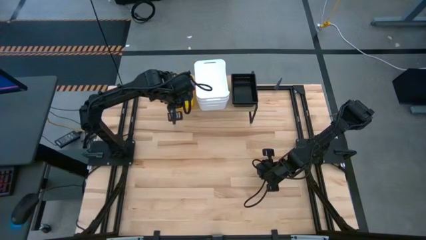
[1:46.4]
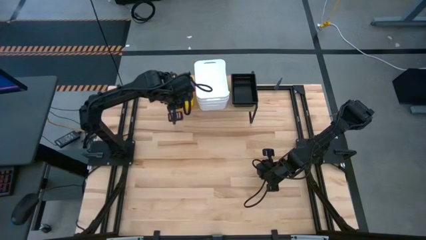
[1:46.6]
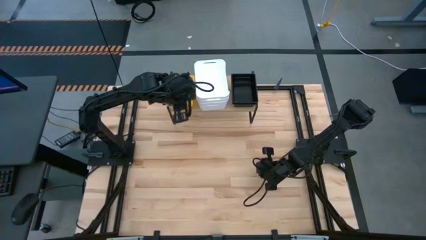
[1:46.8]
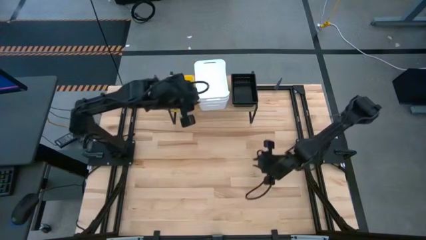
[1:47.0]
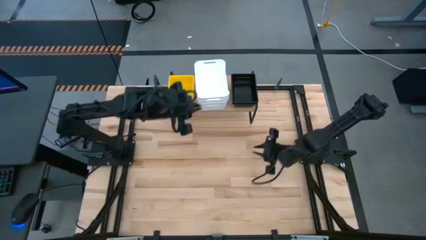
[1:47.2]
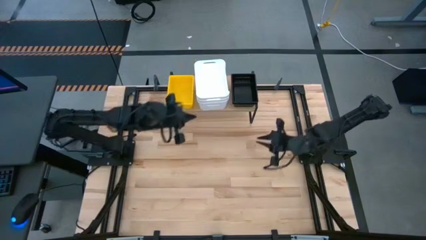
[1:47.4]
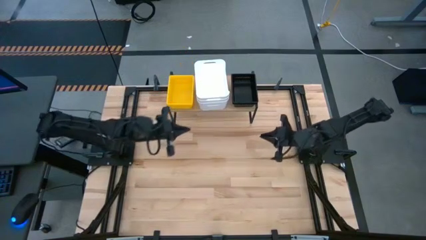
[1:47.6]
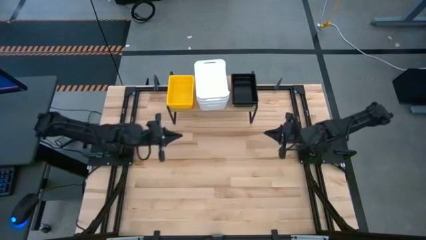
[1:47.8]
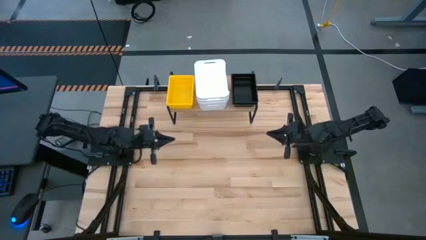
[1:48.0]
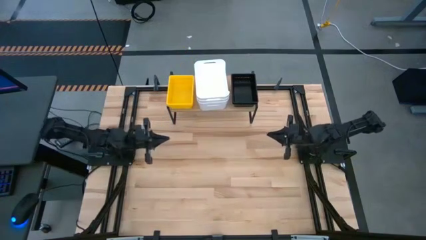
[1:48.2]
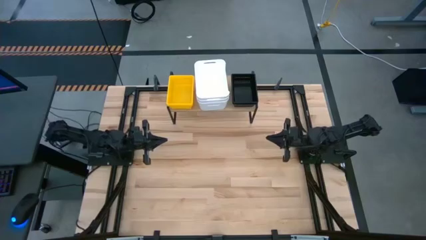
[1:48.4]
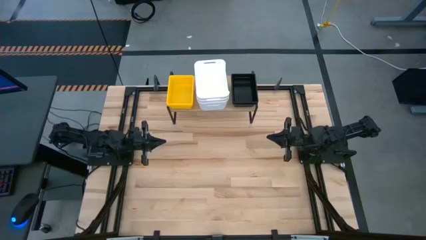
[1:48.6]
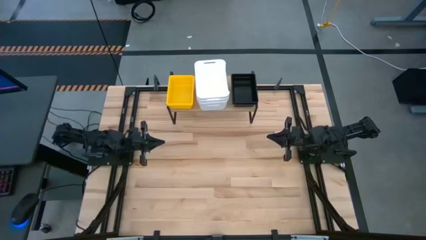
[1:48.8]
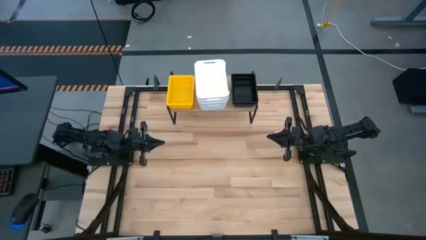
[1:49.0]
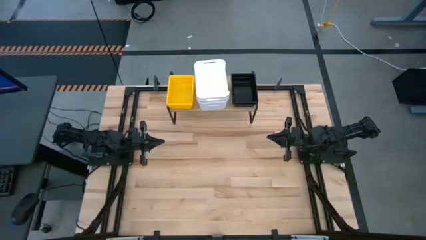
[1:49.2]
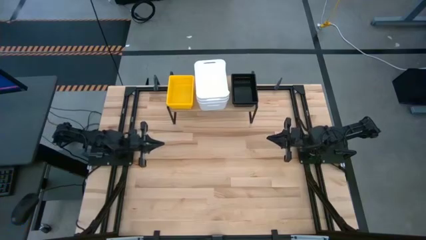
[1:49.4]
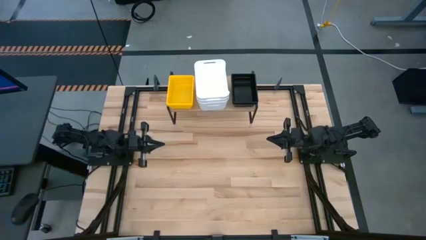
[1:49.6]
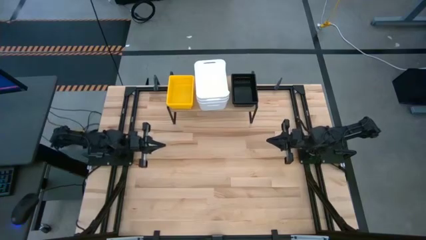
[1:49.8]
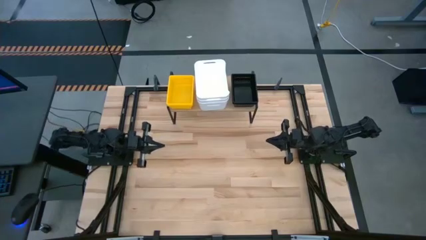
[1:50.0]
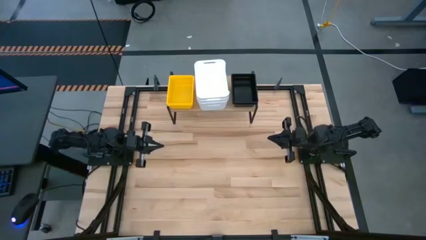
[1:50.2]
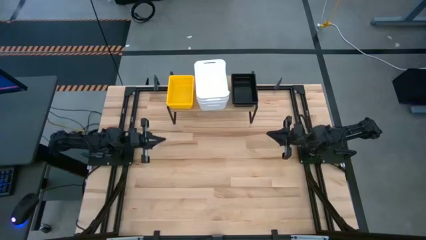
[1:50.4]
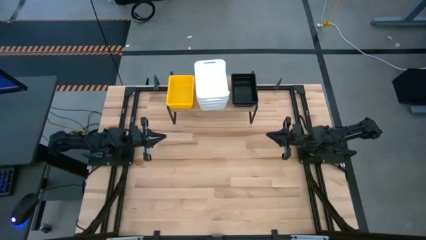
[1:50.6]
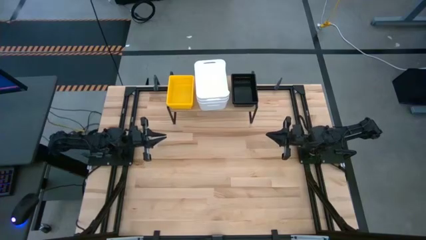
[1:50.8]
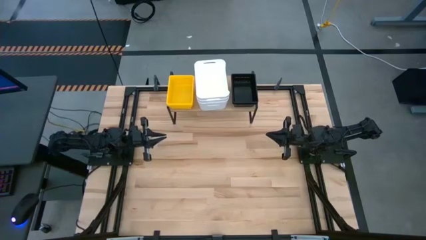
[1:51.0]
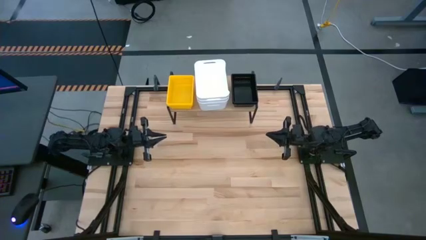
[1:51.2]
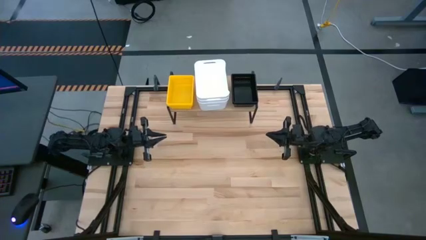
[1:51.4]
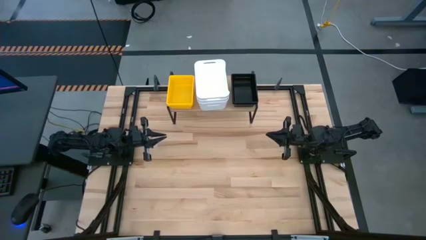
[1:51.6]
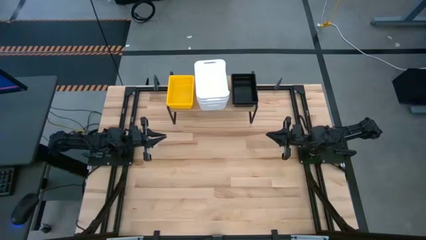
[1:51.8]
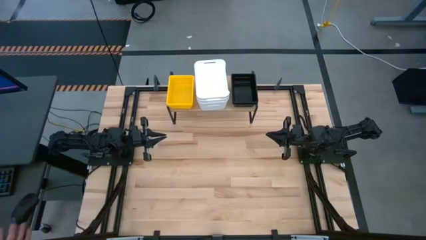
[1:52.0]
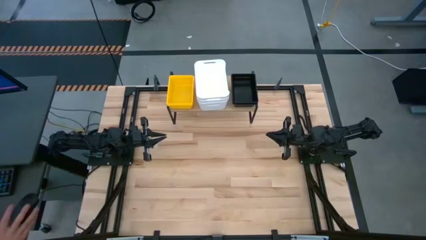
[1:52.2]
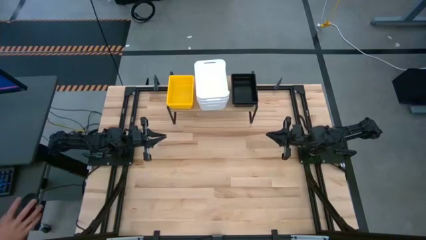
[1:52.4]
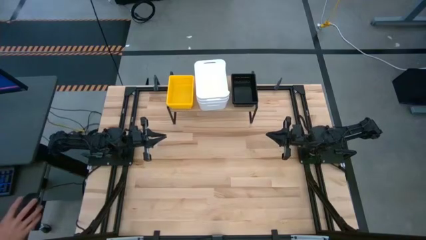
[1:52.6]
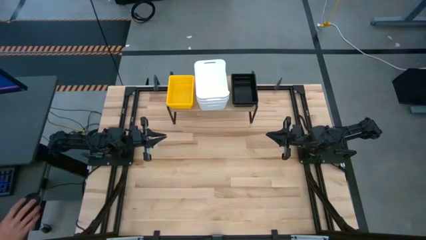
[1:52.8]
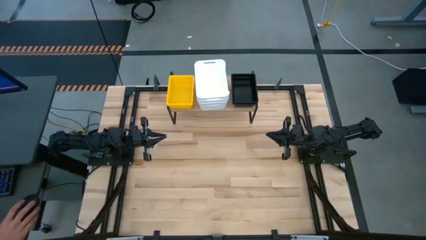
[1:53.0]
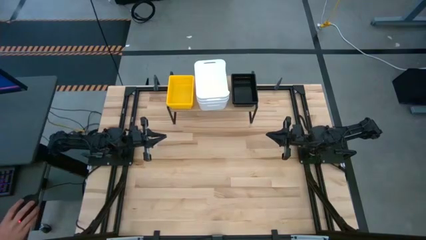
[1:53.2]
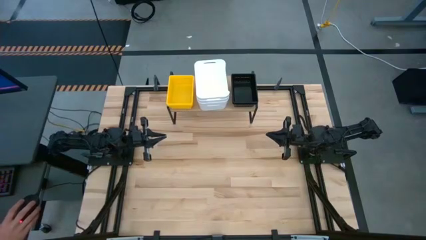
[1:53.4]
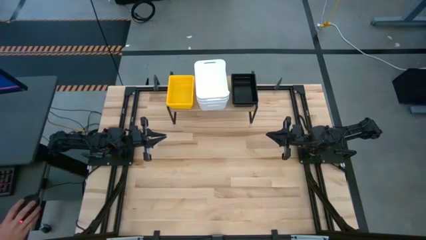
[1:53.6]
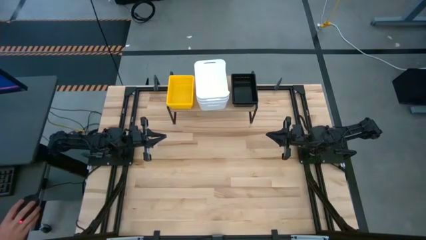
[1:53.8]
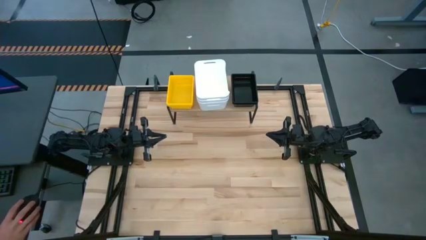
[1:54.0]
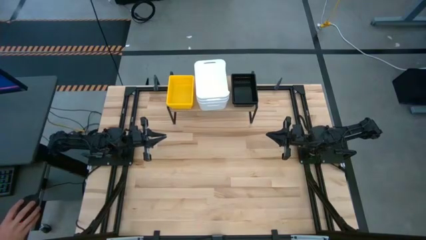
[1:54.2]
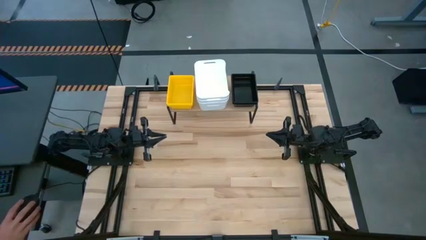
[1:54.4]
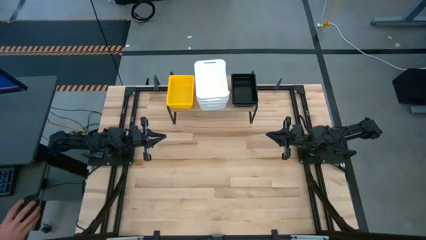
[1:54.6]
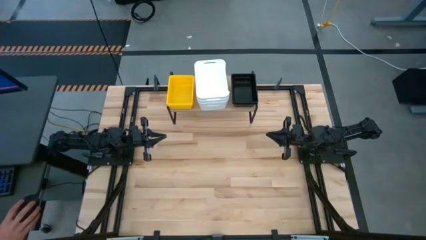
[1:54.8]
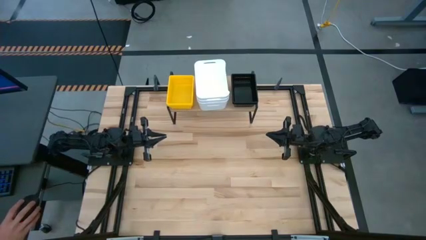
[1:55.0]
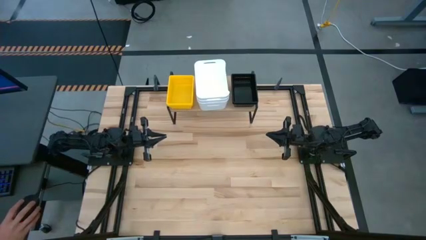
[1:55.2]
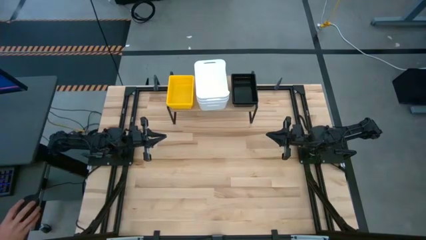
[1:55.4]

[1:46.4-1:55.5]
Task: Stack baskets on shelf by color
Return to Home Position

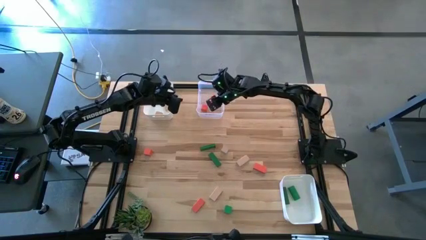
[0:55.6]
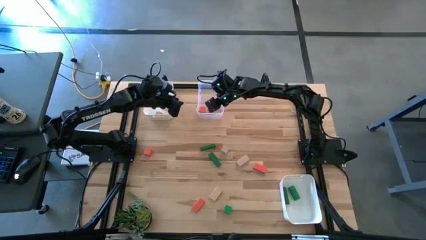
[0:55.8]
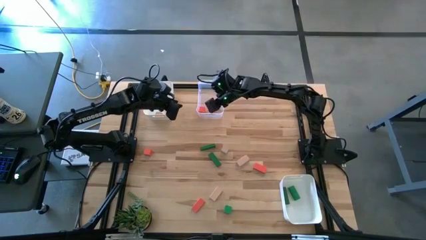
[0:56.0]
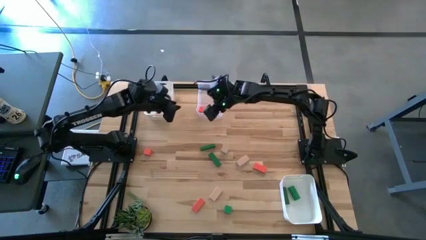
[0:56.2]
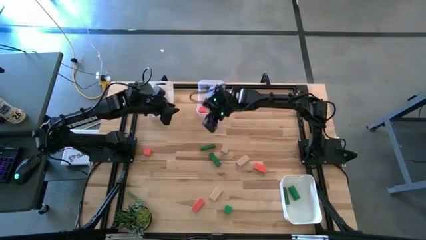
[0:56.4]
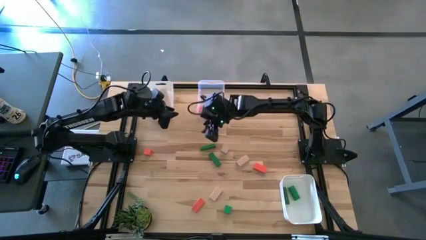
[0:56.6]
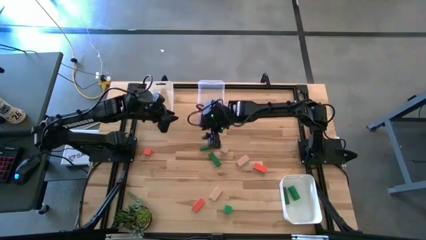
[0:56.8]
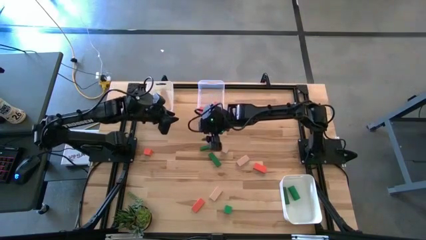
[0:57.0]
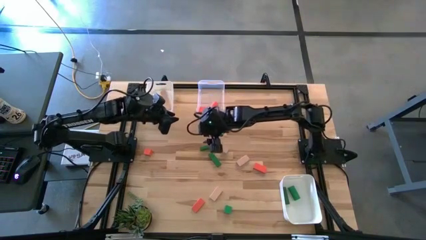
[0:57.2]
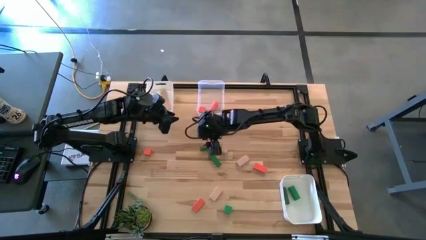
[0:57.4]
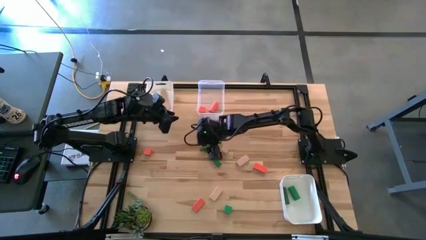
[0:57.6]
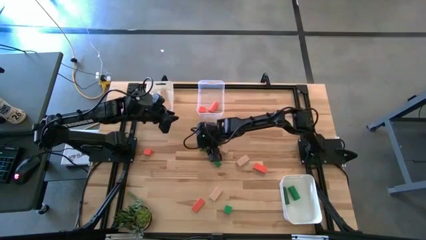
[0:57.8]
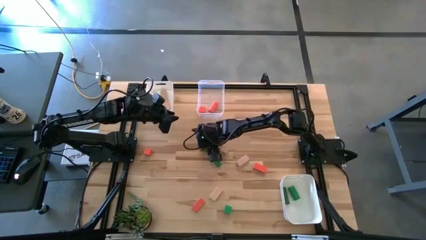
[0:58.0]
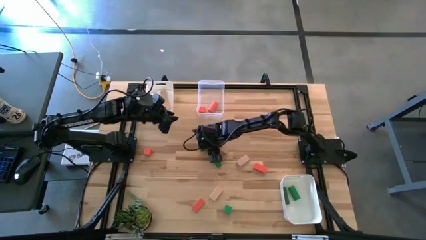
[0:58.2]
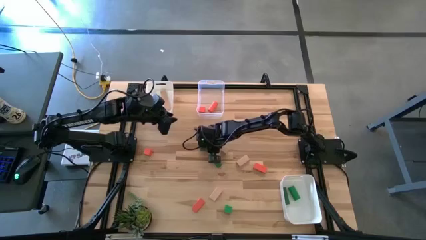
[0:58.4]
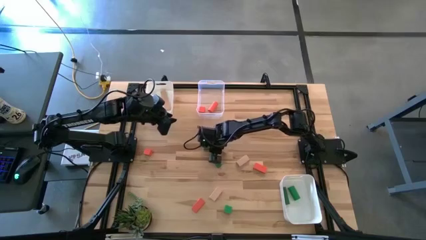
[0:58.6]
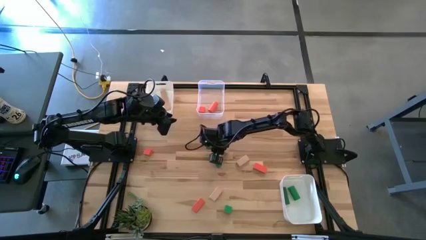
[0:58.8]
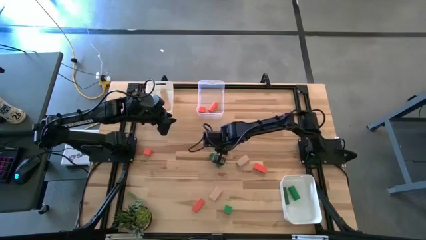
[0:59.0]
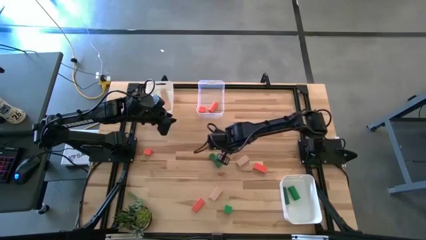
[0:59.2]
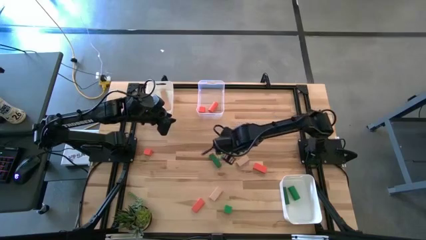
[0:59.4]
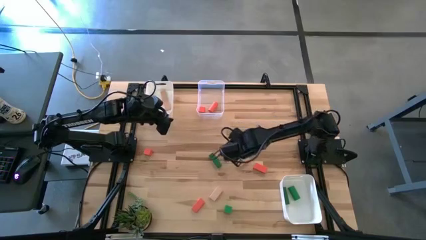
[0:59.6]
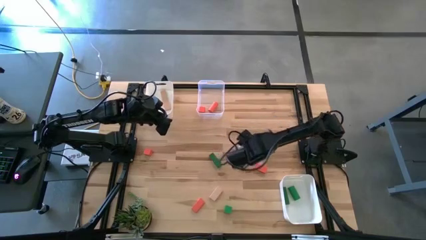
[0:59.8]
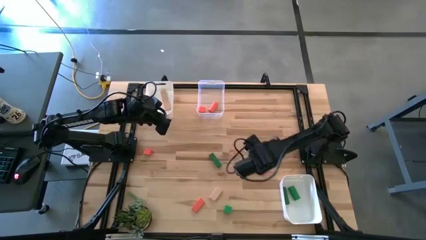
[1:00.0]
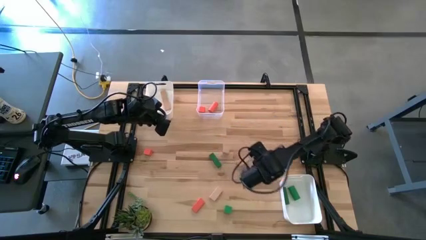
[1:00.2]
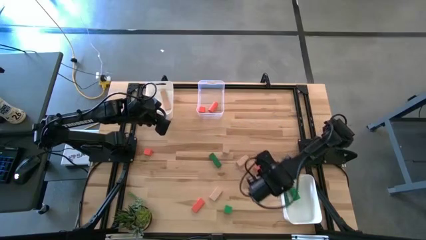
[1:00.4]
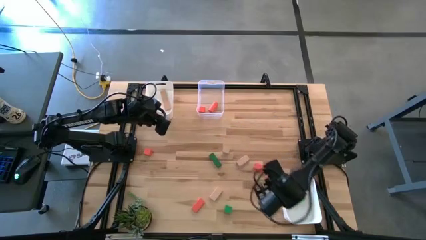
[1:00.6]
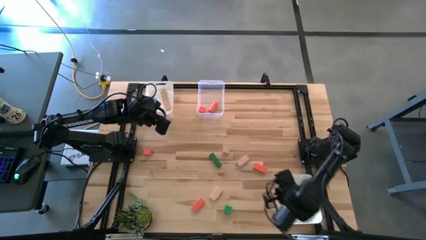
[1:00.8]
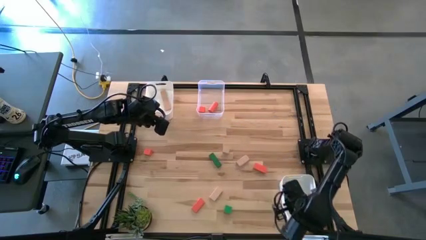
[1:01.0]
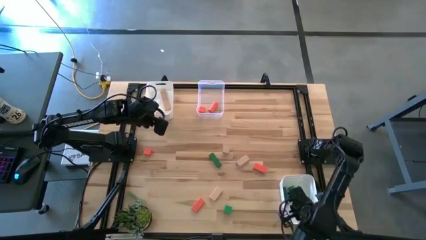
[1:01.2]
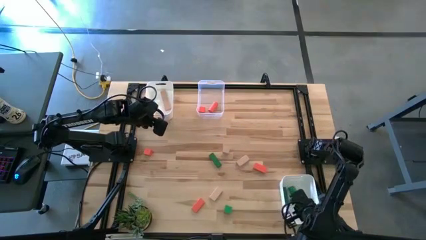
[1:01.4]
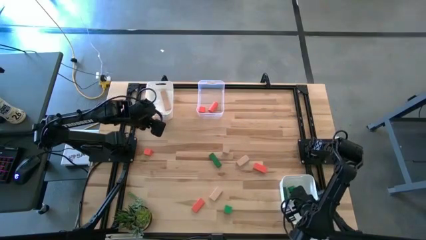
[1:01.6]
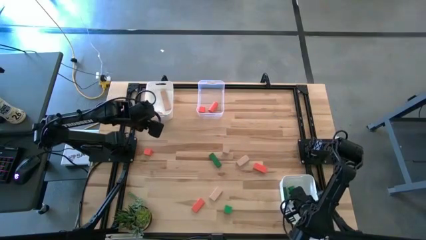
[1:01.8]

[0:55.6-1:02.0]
Task: Sort & place blocks by color
Put the green block into the bottom white bin
